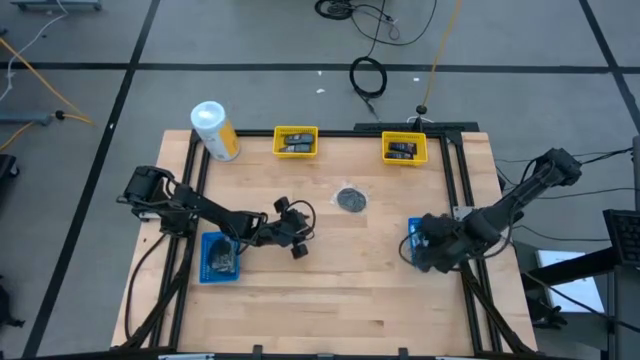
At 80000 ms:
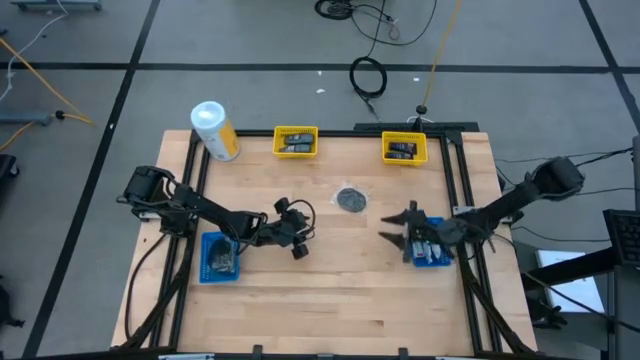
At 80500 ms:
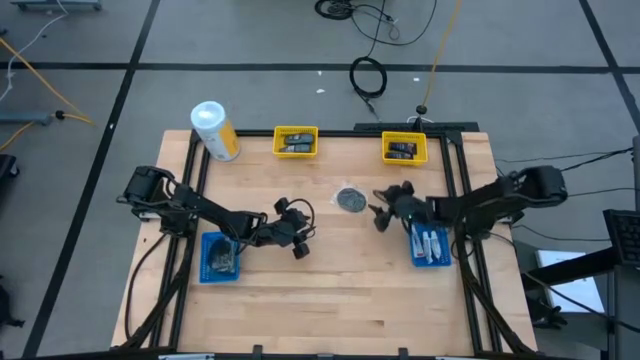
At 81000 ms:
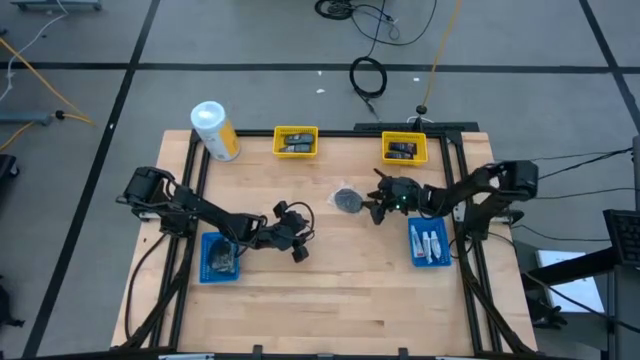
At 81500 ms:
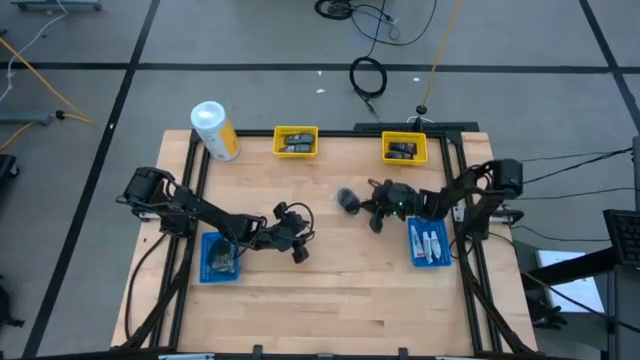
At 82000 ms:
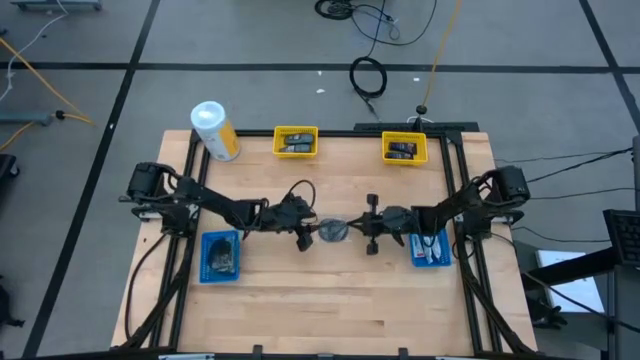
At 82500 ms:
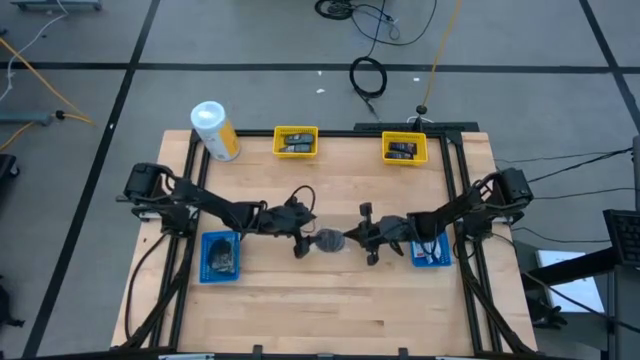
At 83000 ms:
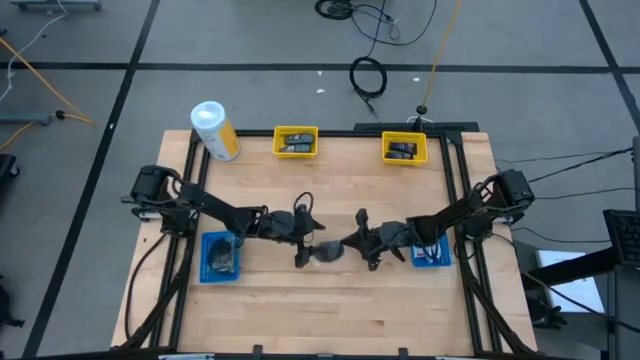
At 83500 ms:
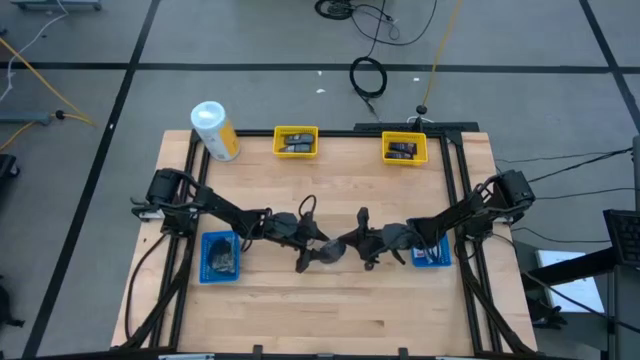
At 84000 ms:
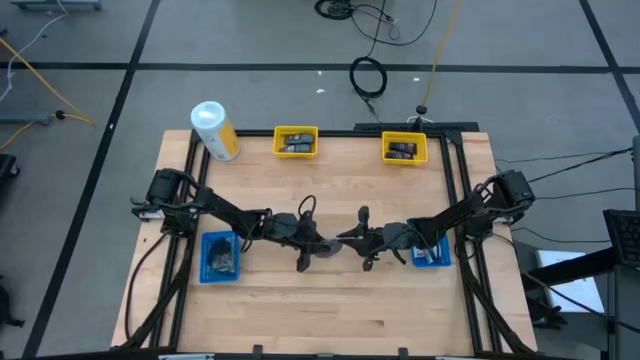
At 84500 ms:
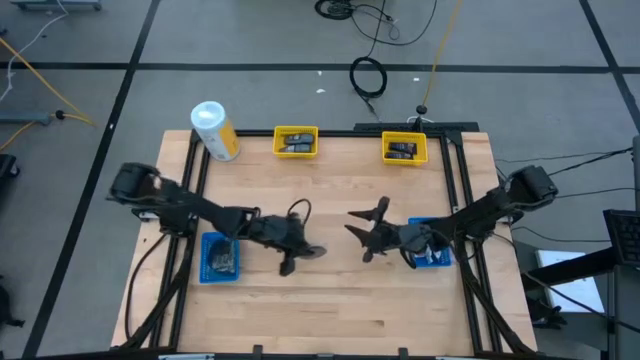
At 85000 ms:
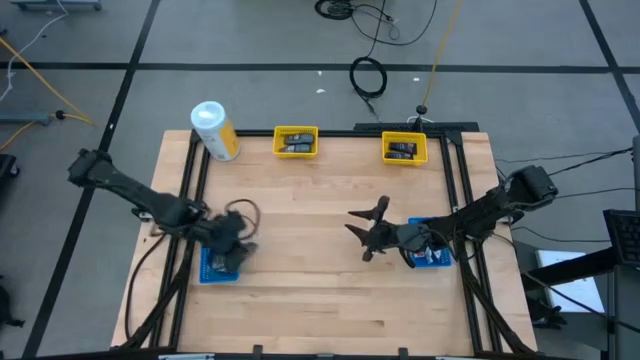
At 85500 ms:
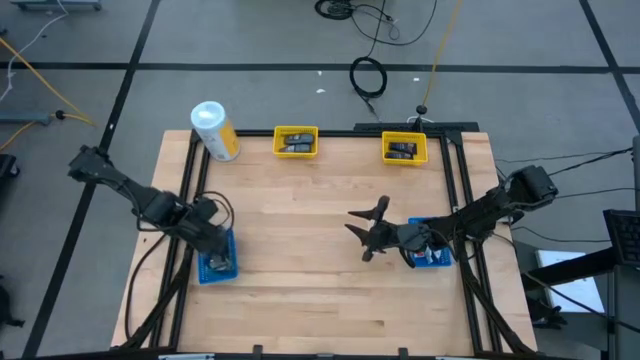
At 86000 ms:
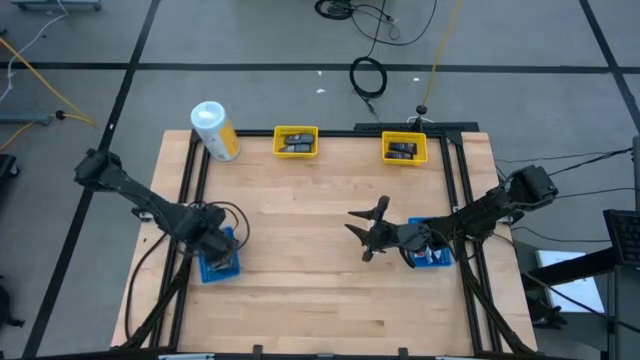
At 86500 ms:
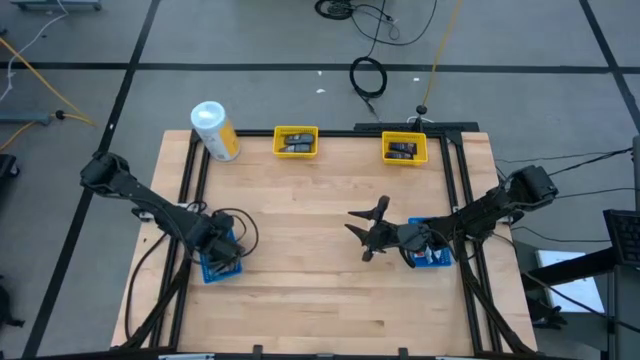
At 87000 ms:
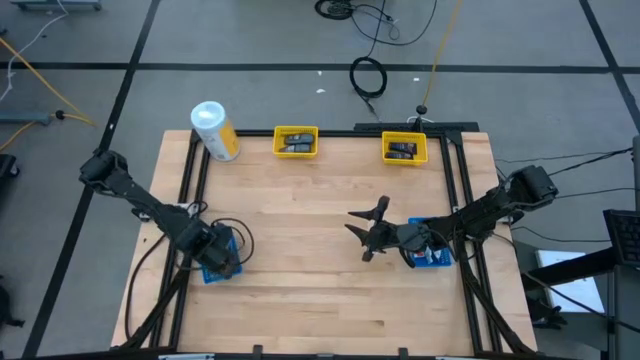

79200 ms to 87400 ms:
Task: Pick & Place Travel size toiletries
Put the black hairbrush into the left blue bin

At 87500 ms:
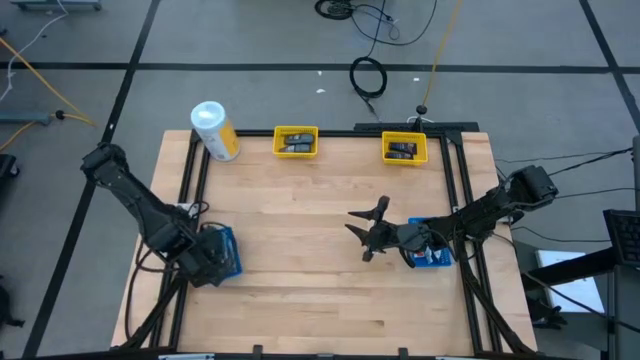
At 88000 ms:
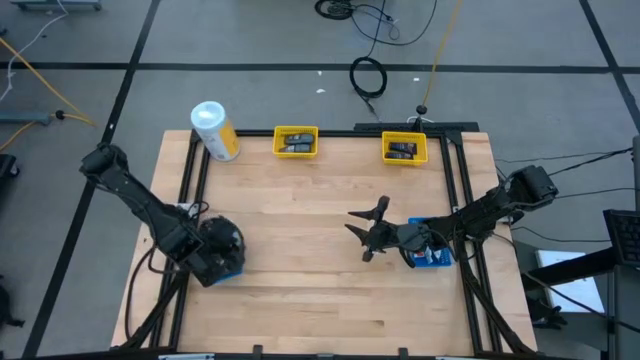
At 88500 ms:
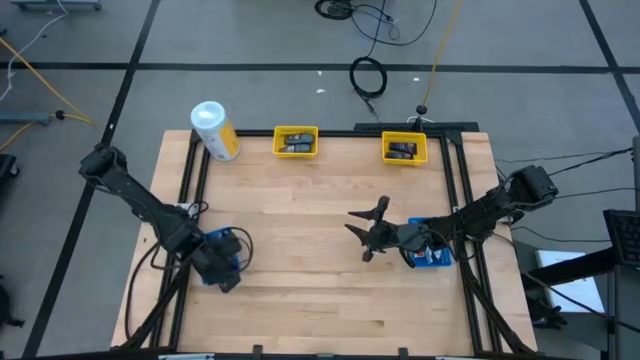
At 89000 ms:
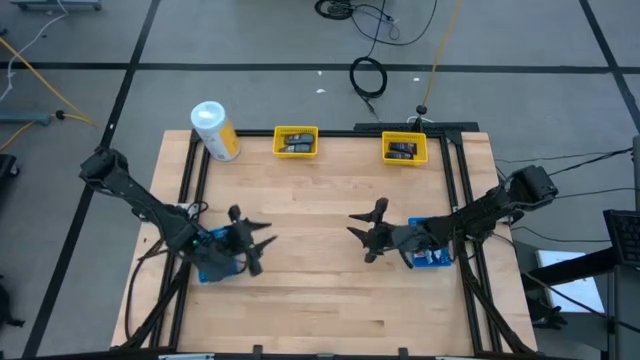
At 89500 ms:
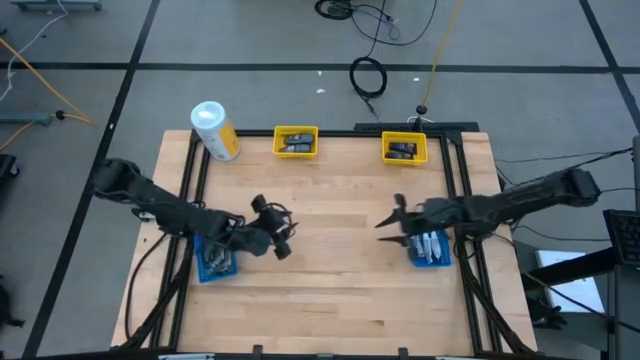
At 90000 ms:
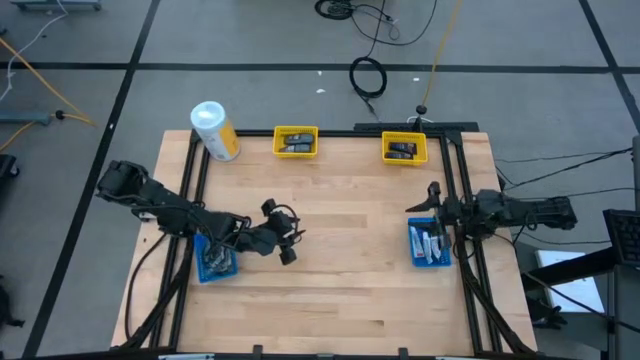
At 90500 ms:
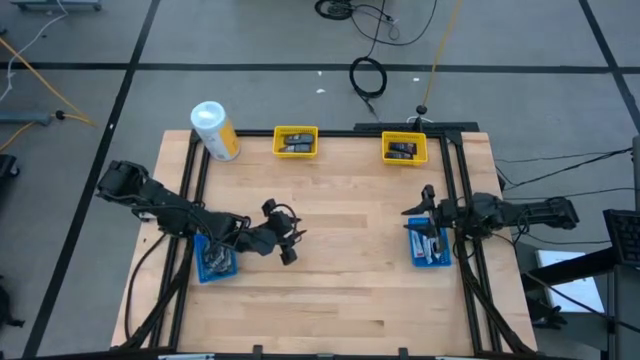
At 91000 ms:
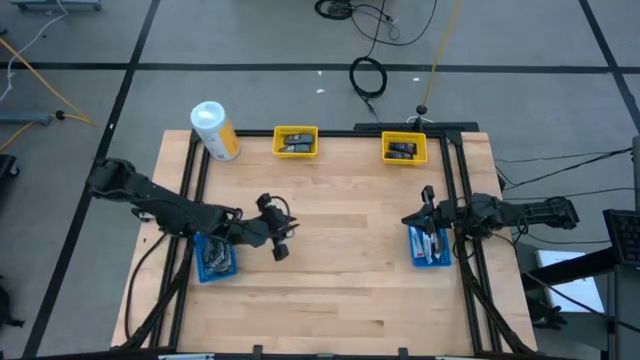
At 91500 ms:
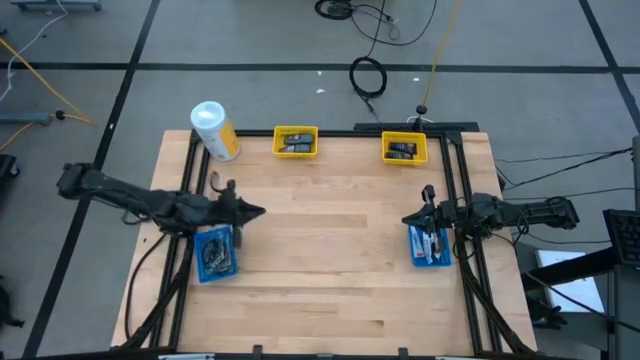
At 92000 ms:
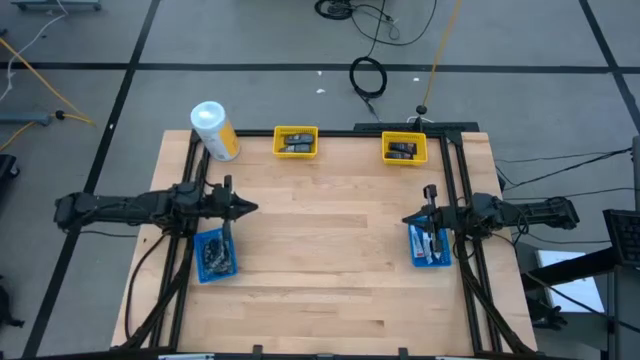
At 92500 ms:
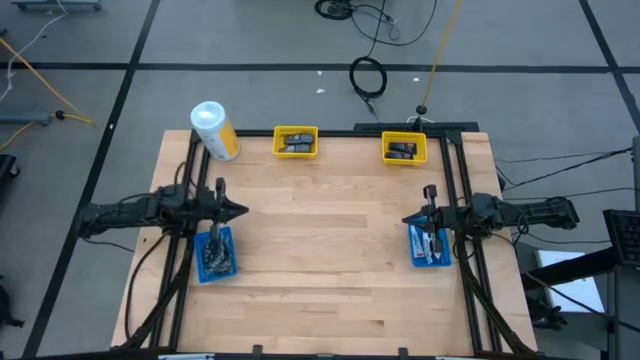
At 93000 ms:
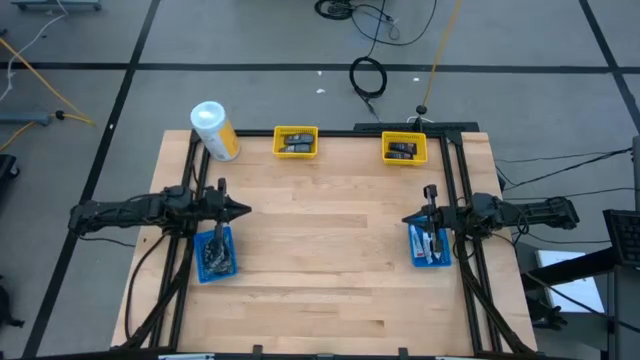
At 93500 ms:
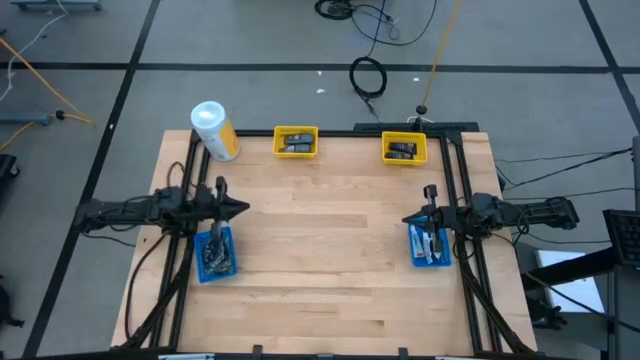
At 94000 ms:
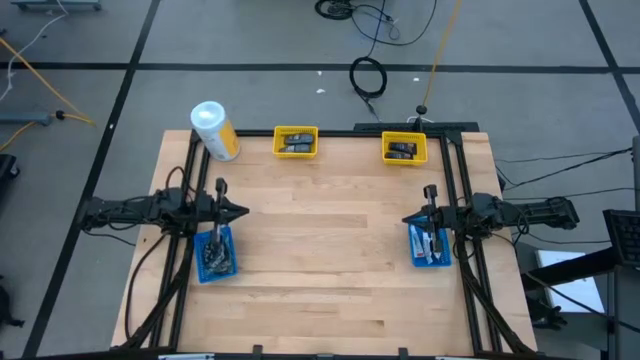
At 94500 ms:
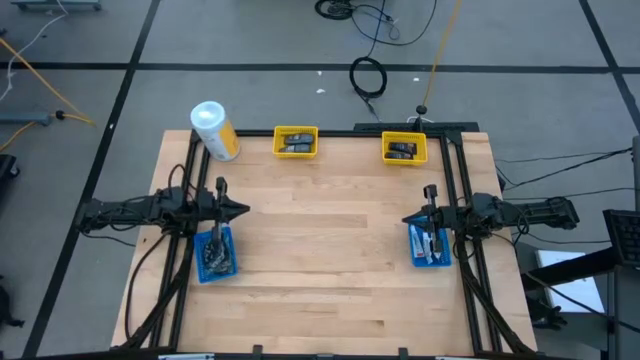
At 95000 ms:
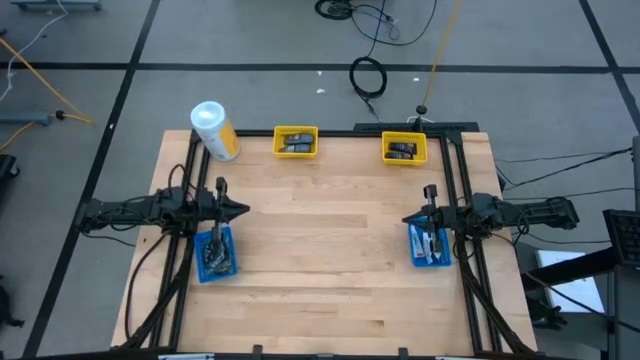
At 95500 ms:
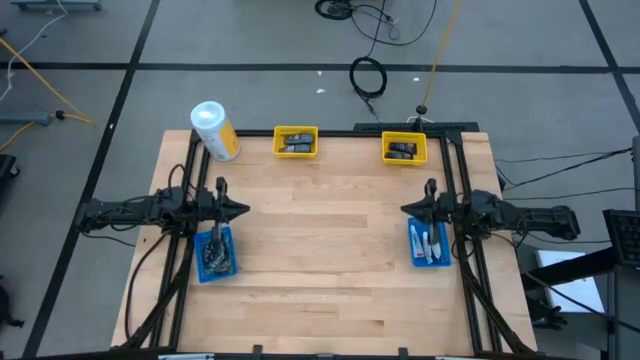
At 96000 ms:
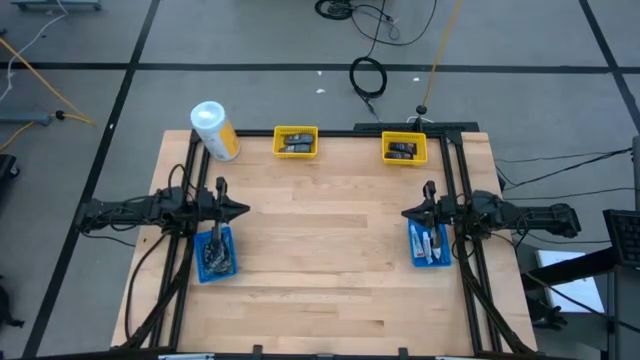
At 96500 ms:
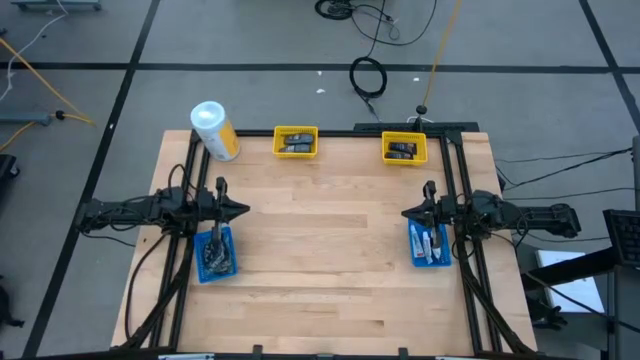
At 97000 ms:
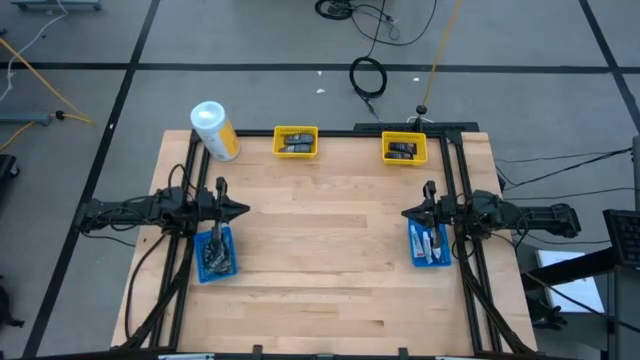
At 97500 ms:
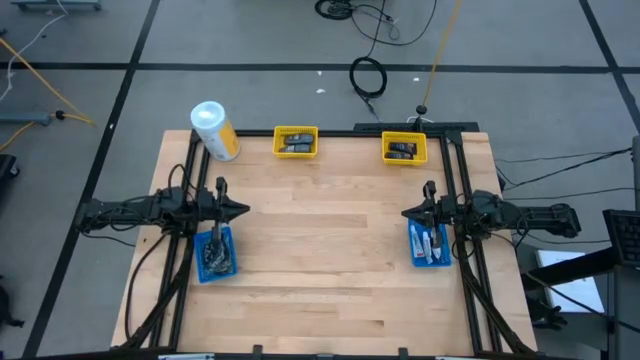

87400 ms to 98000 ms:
Return to Home Position

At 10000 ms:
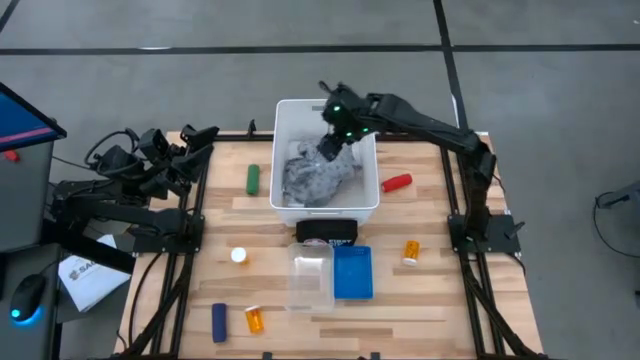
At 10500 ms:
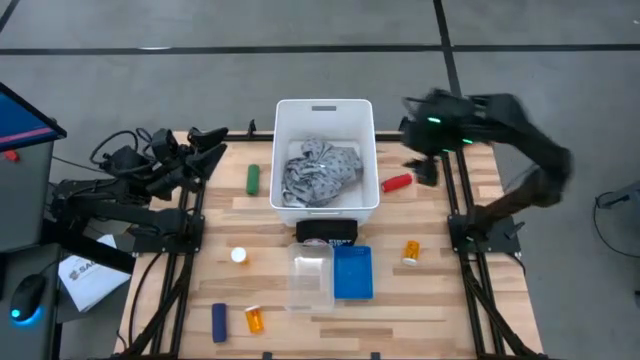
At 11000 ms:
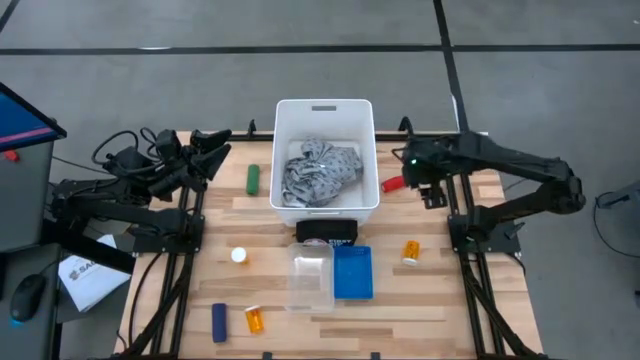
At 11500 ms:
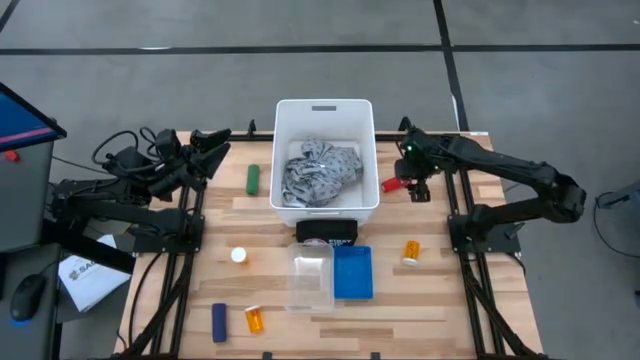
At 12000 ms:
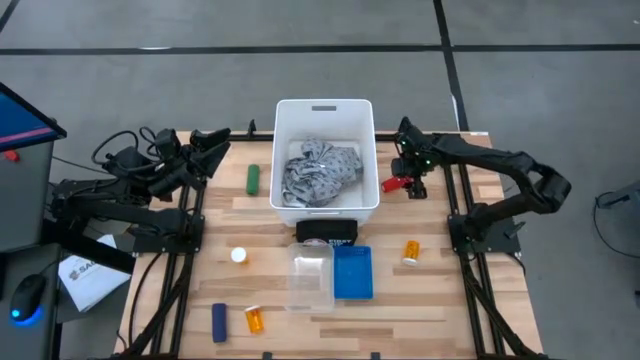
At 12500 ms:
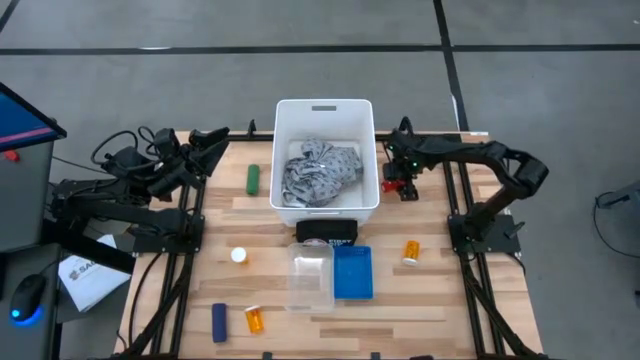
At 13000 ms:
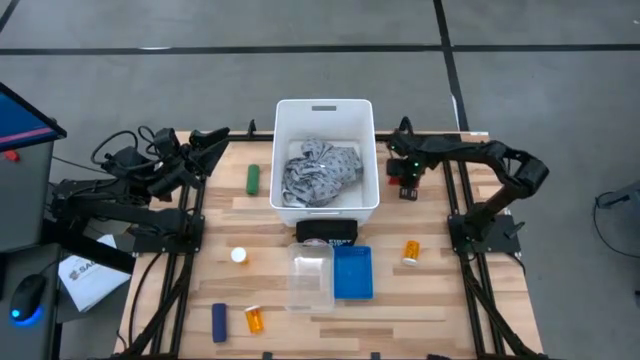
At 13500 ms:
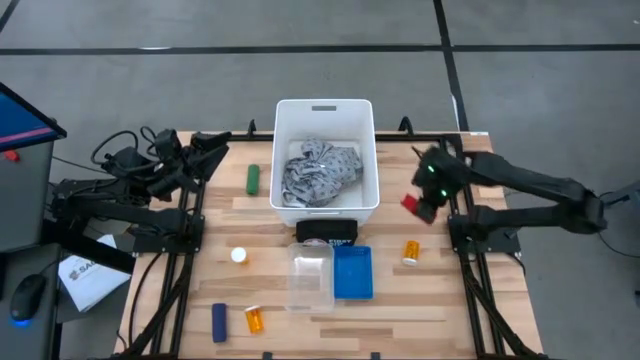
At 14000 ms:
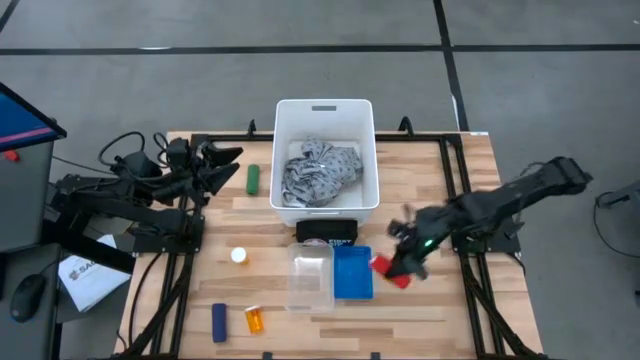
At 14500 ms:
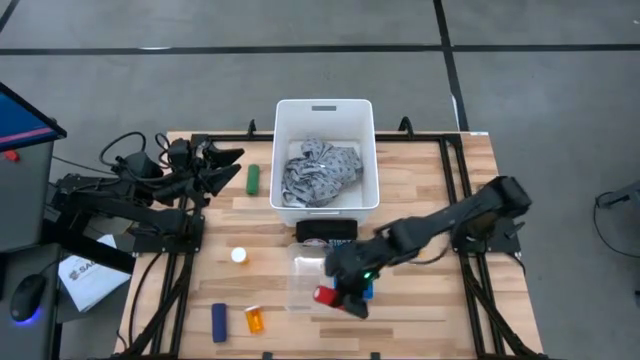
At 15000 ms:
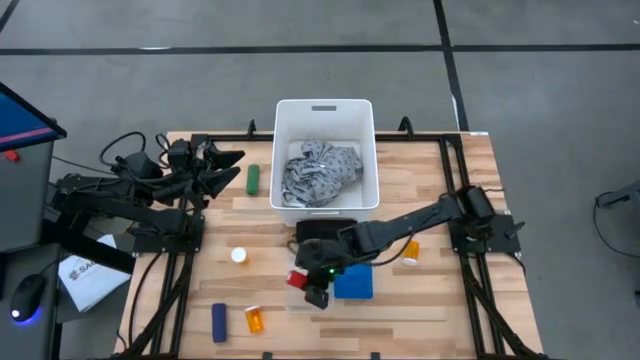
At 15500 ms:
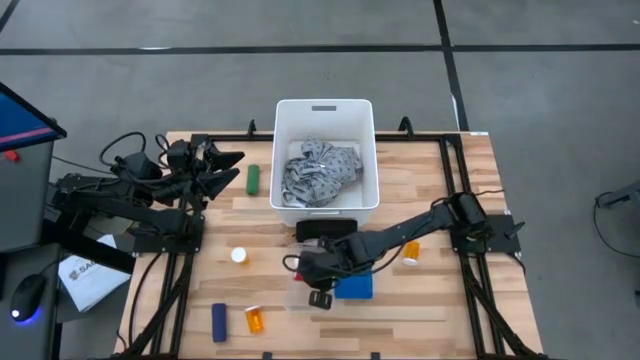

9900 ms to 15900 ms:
Task: Pick & place medical supplies in basket/bin
Put the red bandage into the transparent bin
